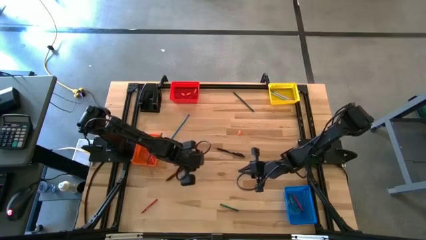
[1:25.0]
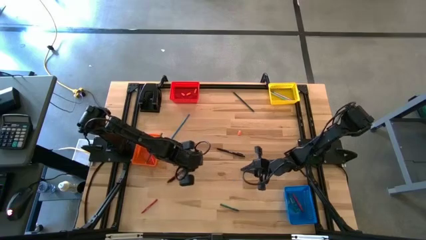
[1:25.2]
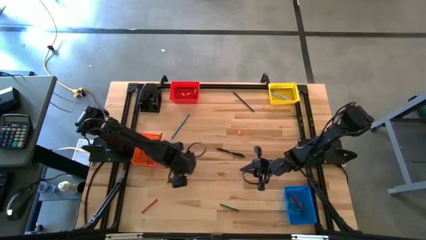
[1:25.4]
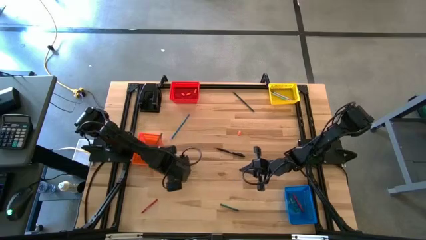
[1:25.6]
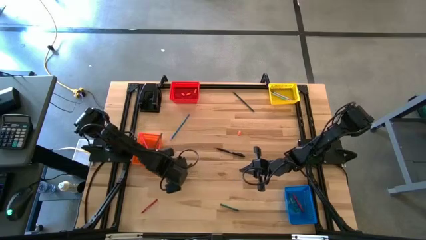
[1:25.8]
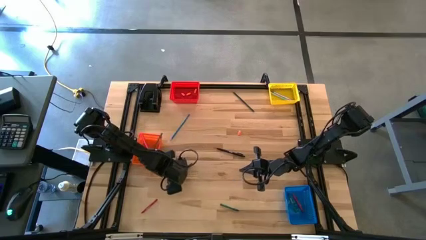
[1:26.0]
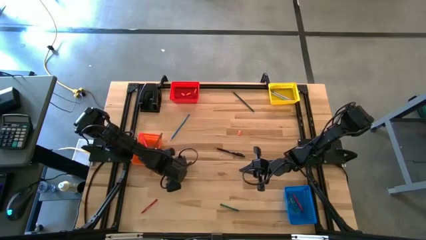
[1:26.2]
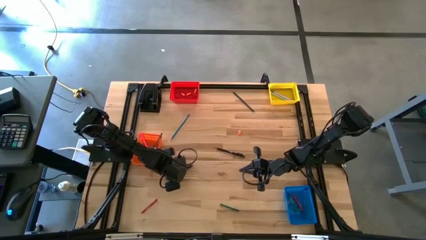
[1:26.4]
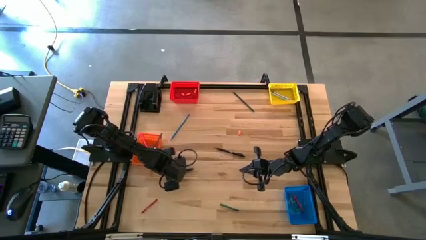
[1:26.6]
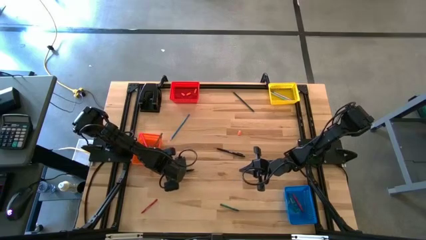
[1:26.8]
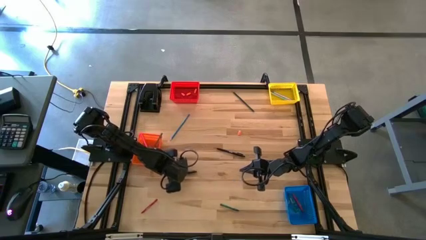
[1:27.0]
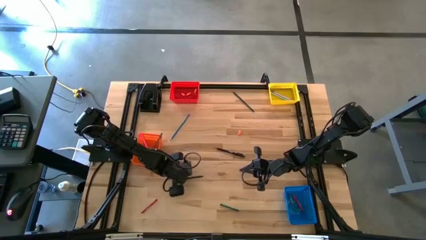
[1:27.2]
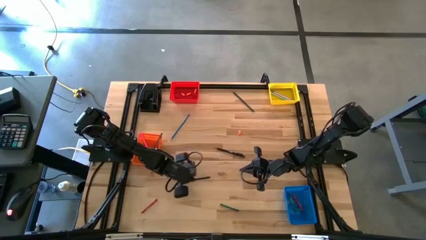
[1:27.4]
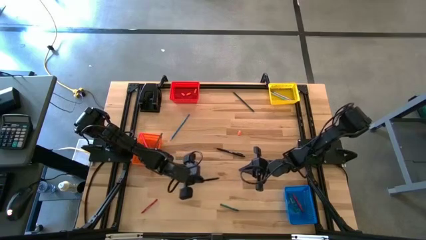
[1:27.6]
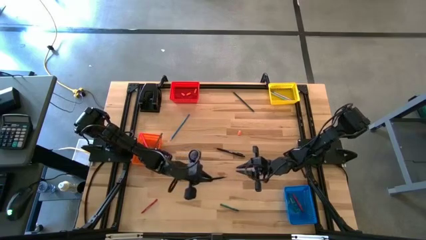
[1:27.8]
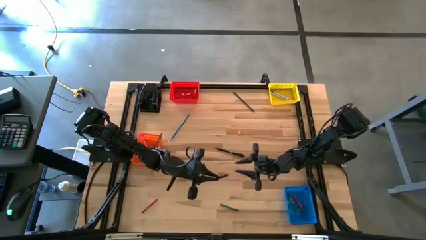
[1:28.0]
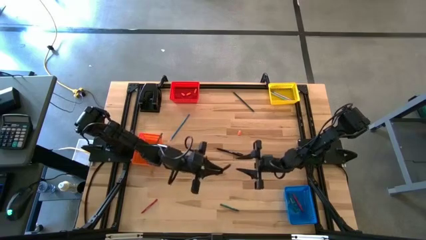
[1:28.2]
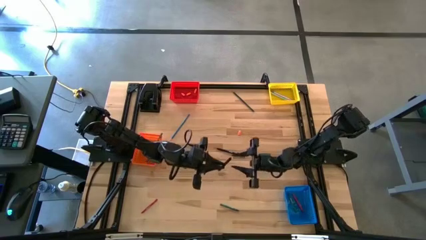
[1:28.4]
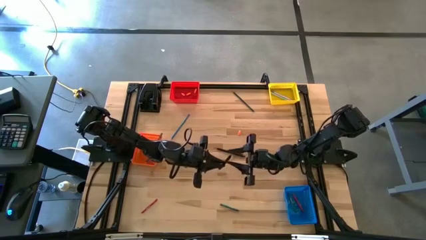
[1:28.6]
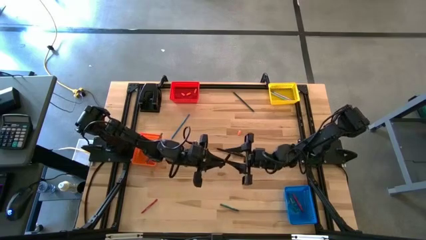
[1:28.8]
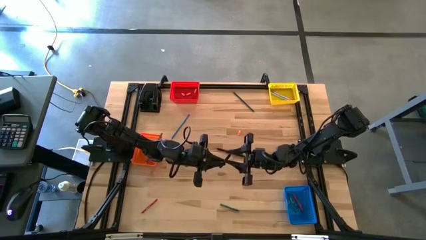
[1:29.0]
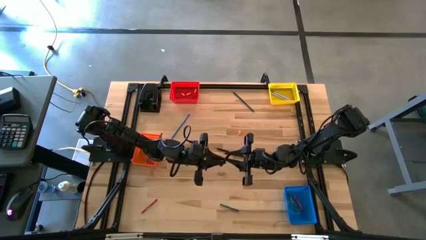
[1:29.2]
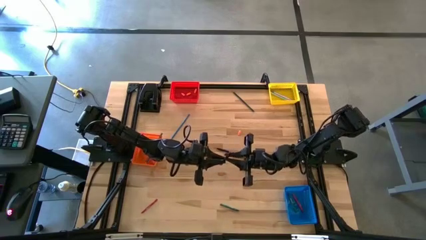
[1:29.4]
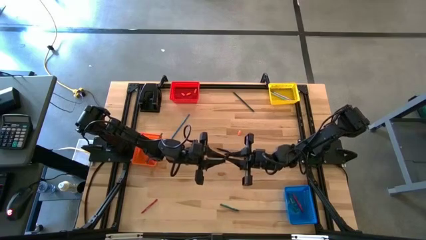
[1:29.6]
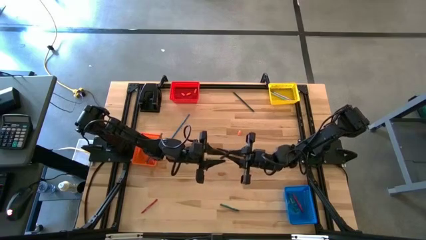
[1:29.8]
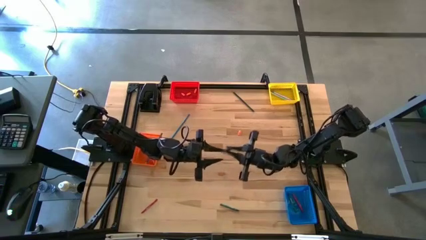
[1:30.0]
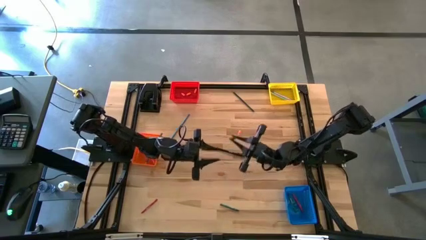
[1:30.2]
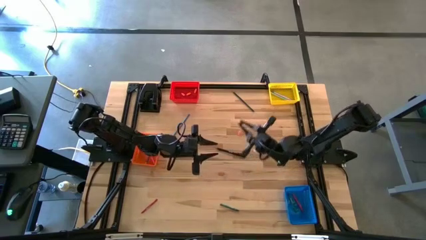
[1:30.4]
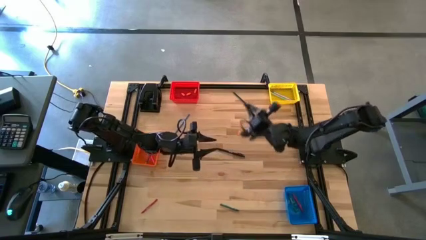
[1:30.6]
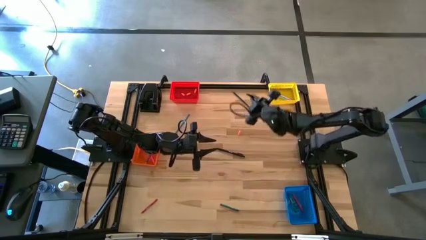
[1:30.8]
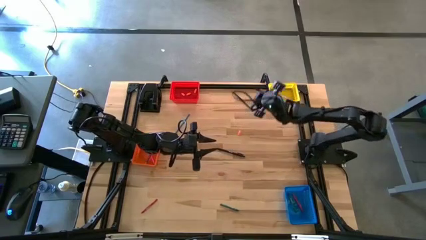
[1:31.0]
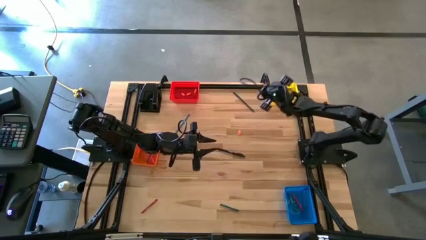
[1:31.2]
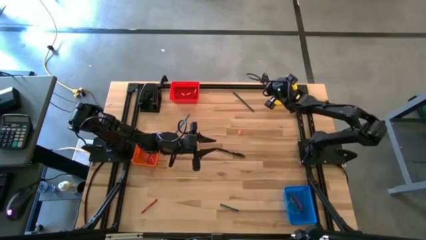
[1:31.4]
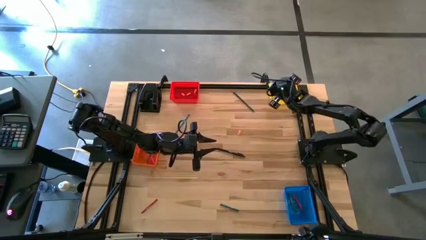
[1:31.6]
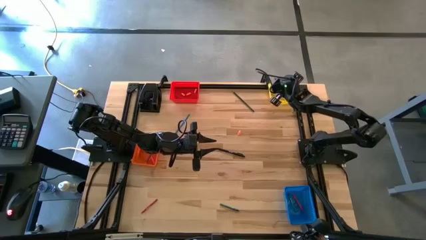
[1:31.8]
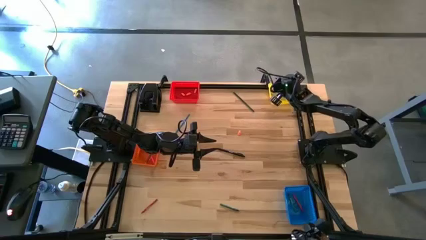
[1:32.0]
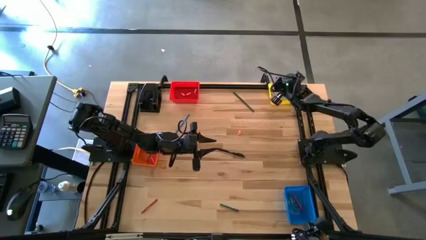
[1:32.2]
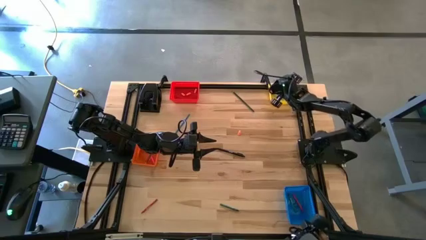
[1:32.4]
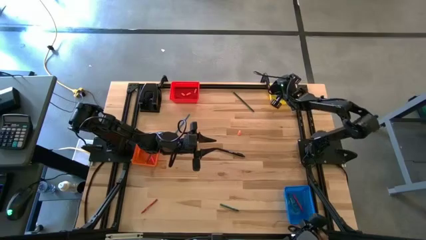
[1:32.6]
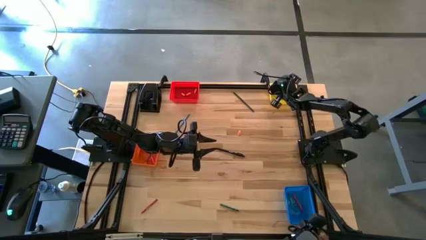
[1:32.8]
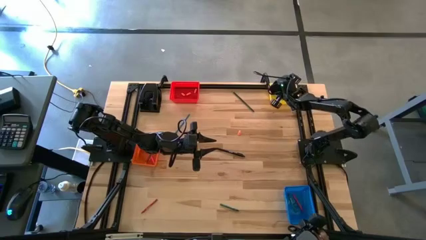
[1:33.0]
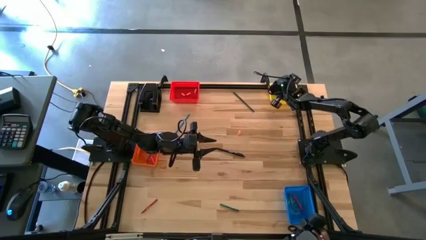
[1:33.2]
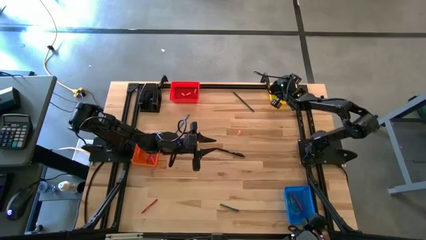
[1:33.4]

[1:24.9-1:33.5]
Task: Sort crayons/erasers/pens/pencils in bins
Put the black pen into the yellow basket

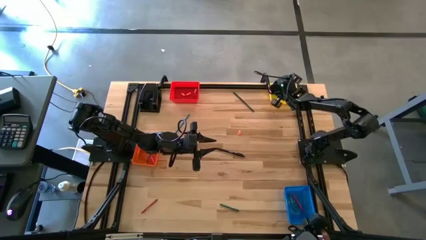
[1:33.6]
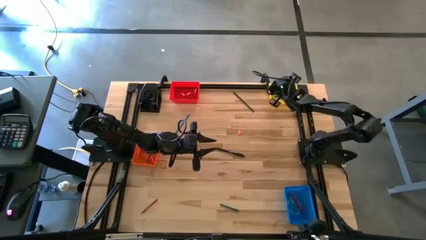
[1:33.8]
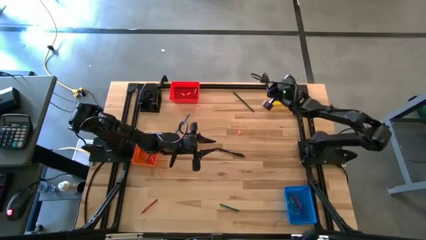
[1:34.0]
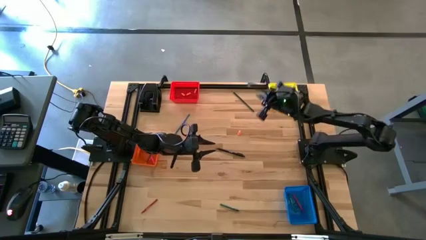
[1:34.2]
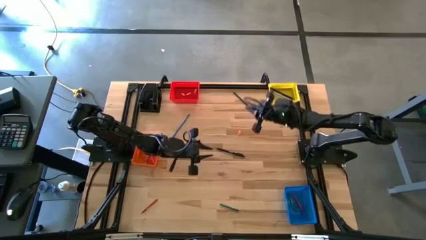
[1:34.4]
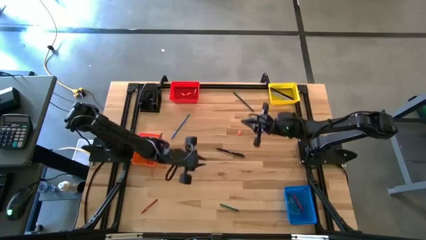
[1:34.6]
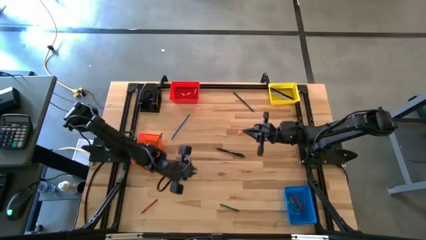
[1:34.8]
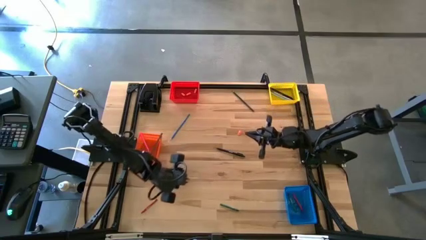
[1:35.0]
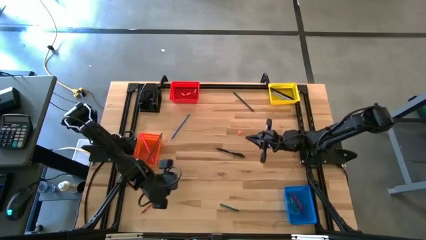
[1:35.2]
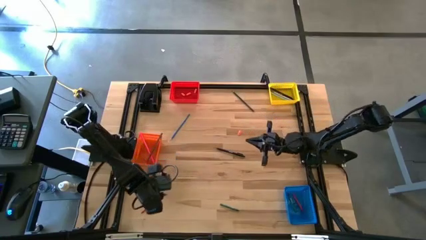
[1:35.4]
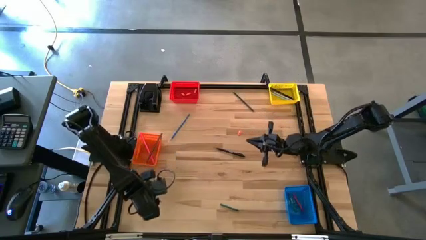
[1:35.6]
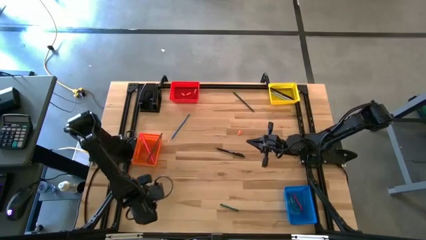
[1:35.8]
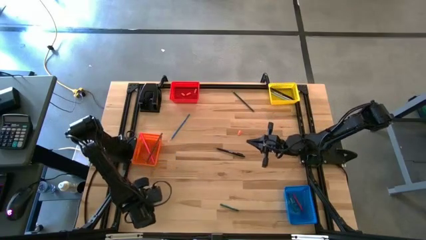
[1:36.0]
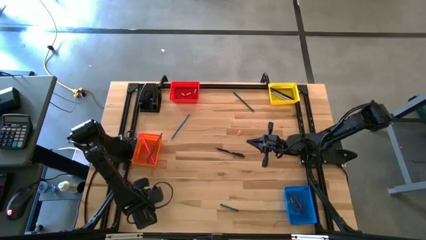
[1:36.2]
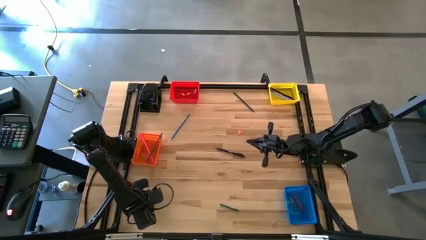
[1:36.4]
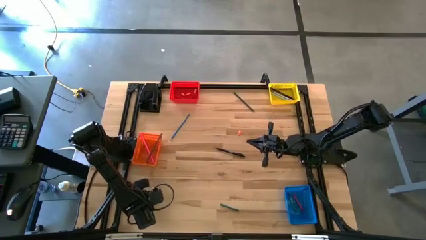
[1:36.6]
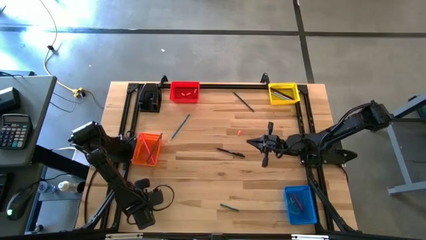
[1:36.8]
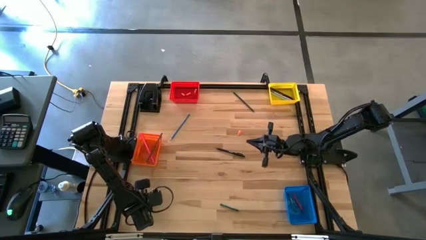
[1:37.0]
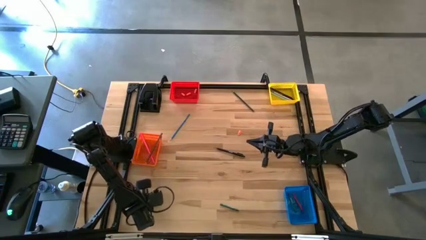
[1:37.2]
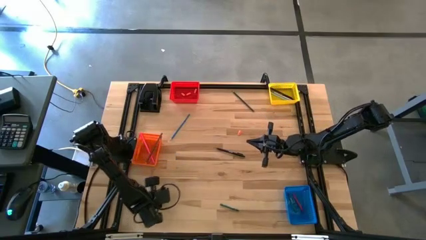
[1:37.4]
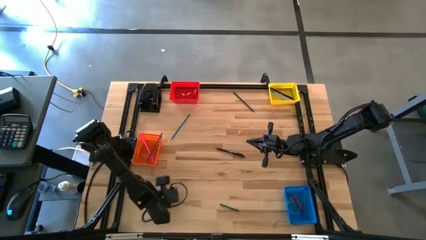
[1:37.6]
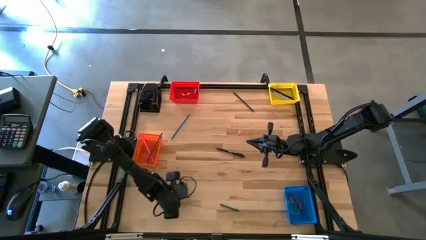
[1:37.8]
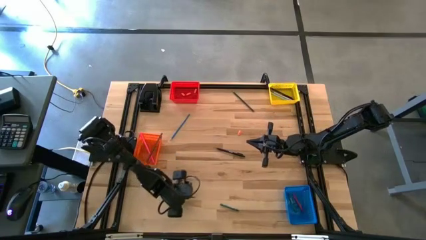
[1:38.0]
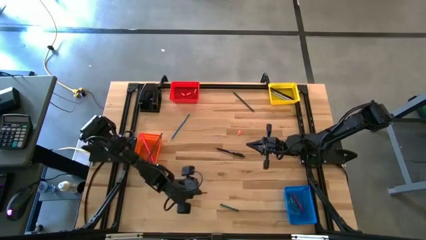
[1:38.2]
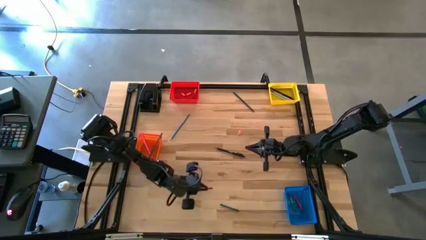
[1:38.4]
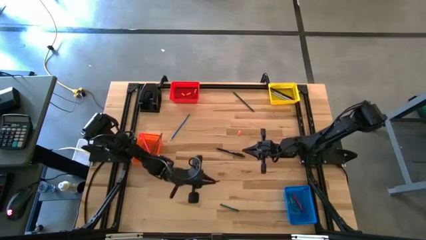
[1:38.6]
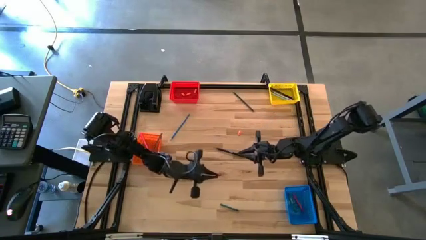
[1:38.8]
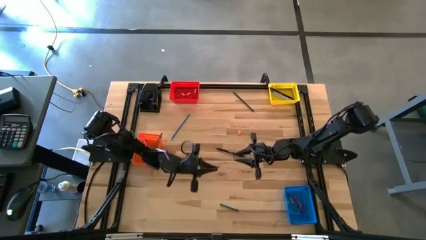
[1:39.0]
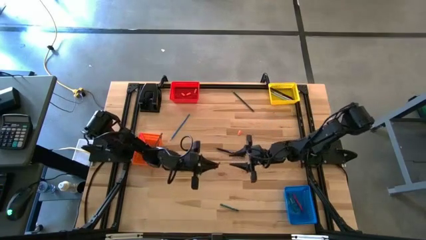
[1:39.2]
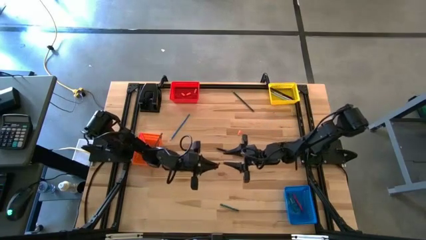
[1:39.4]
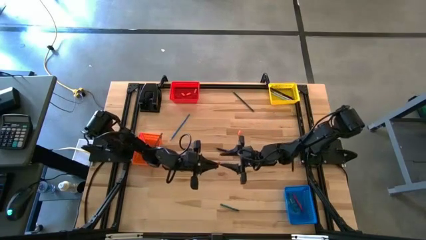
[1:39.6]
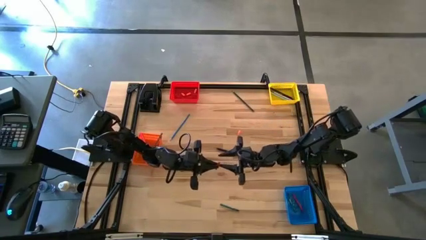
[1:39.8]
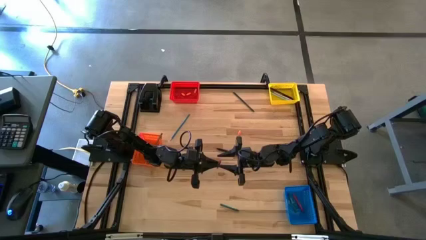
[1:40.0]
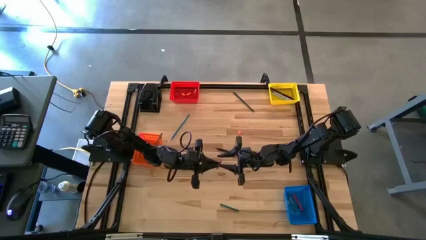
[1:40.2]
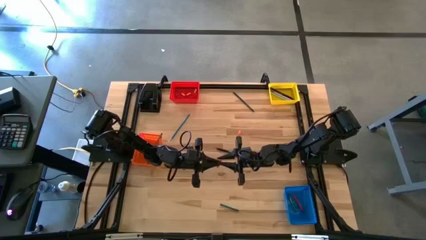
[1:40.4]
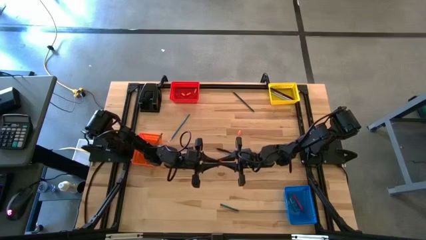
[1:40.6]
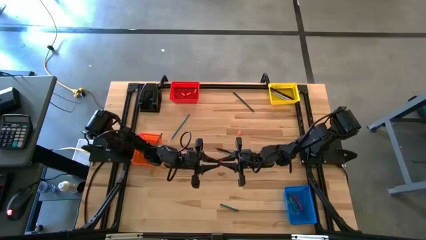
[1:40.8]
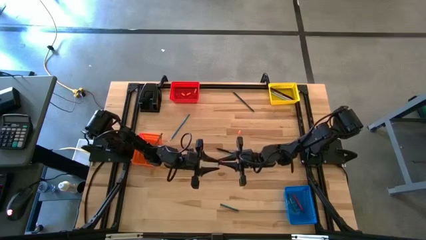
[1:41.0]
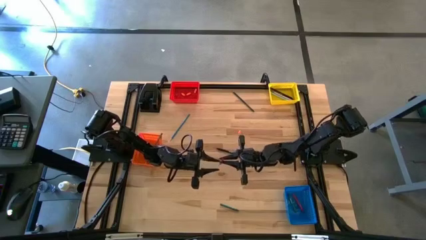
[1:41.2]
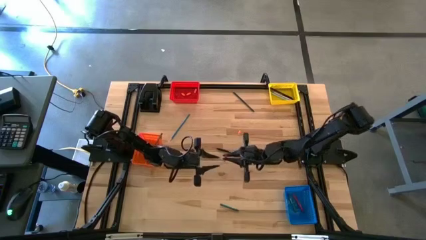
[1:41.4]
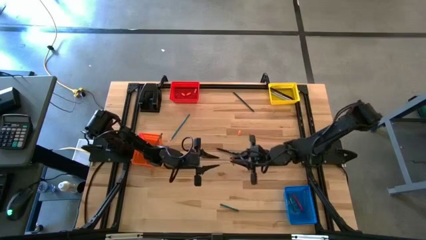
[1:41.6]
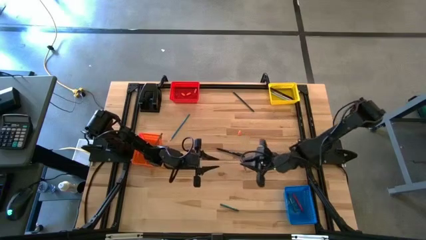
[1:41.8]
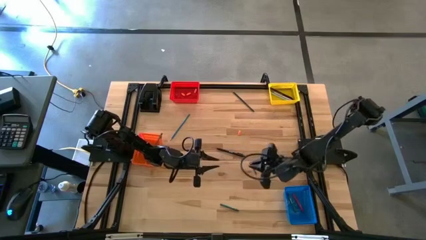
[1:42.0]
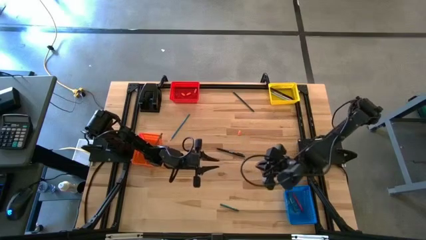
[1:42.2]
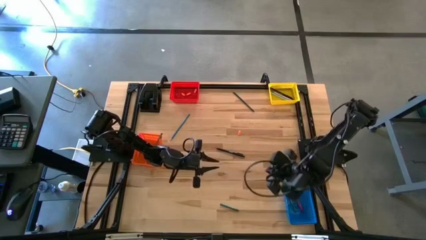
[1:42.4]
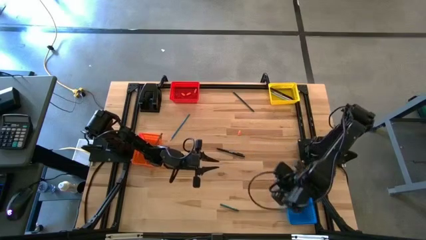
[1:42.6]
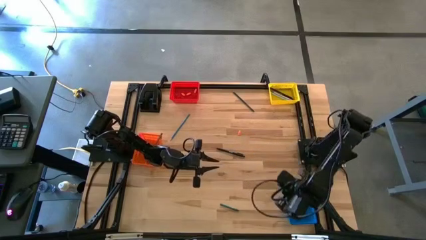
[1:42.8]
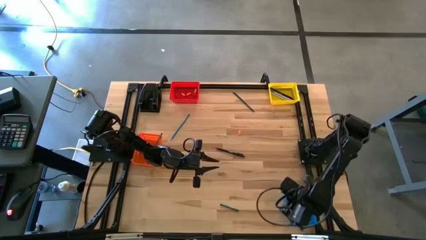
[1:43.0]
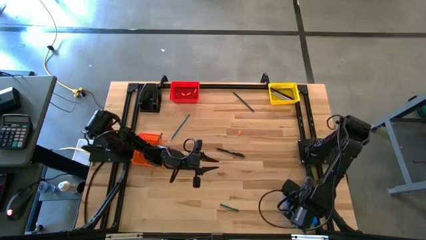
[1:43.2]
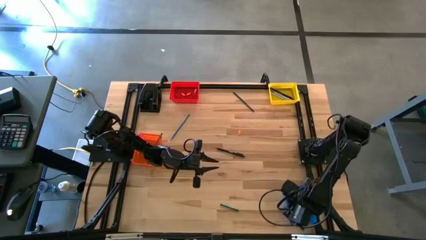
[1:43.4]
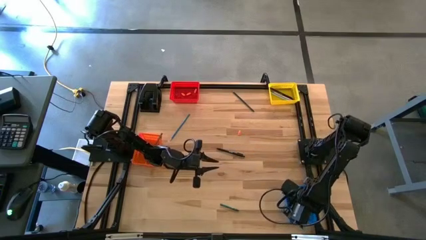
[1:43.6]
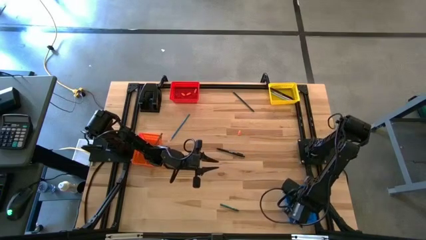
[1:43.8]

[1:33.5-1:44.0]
Put the red crayon into the blue basket
